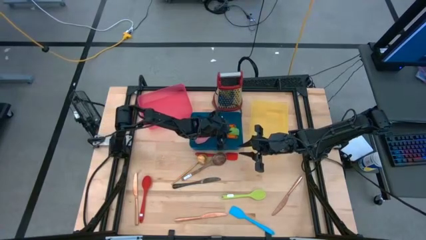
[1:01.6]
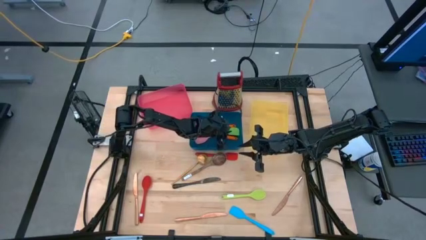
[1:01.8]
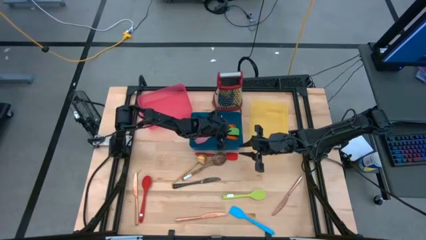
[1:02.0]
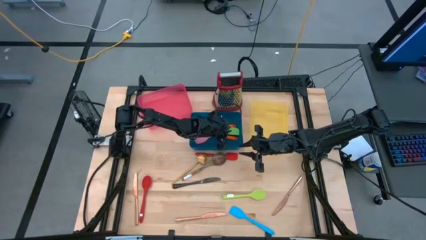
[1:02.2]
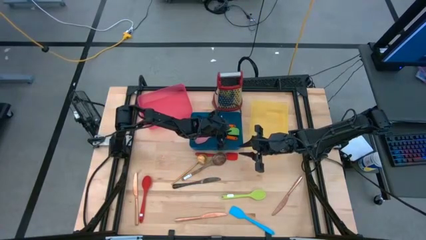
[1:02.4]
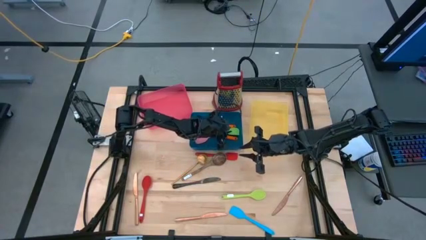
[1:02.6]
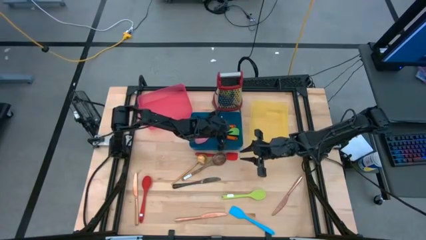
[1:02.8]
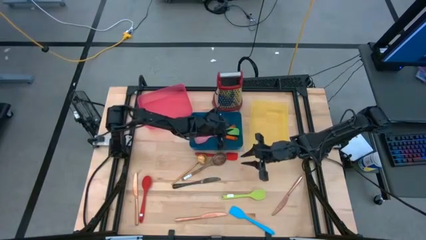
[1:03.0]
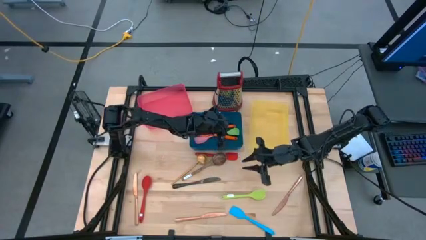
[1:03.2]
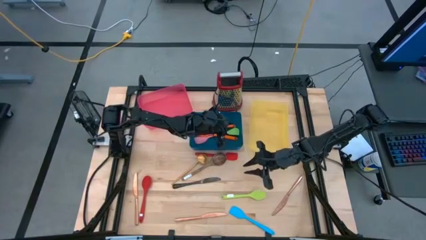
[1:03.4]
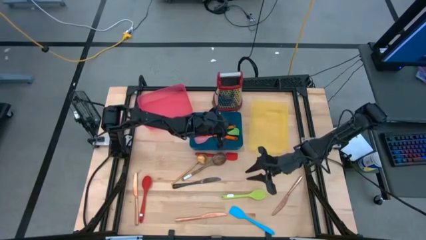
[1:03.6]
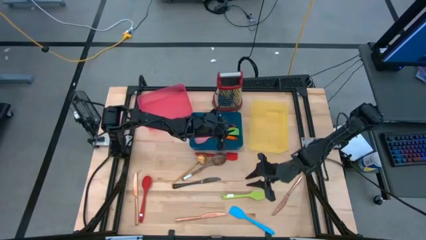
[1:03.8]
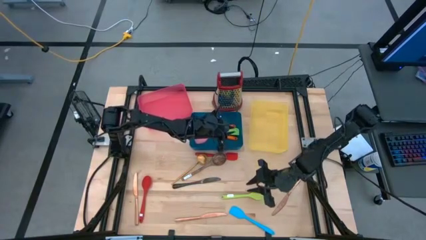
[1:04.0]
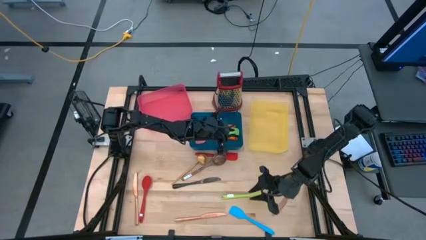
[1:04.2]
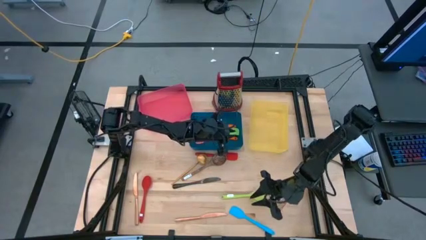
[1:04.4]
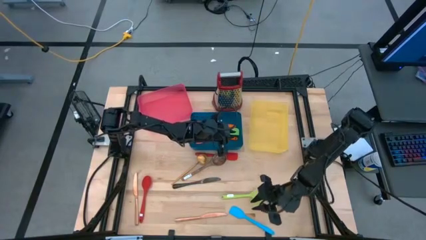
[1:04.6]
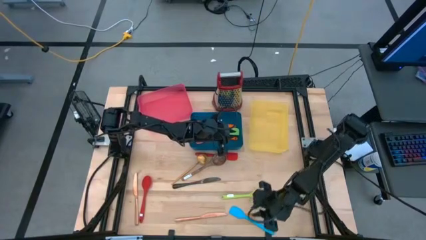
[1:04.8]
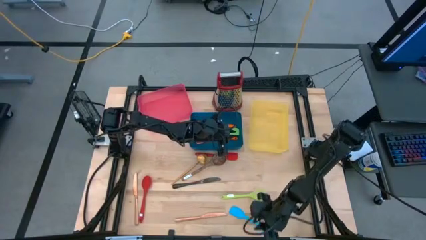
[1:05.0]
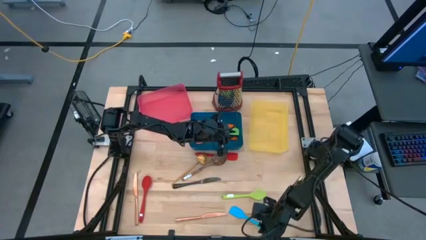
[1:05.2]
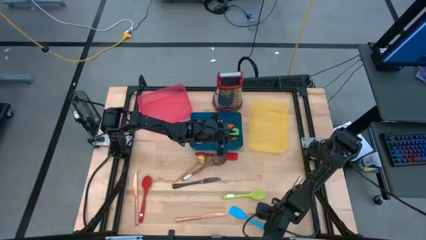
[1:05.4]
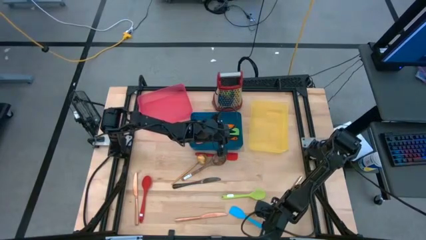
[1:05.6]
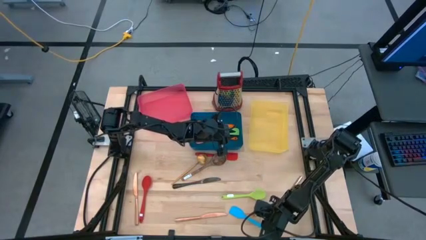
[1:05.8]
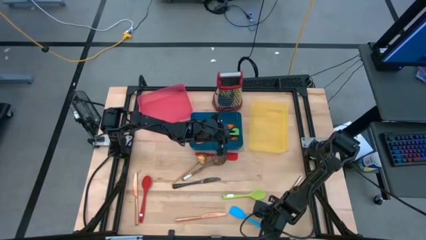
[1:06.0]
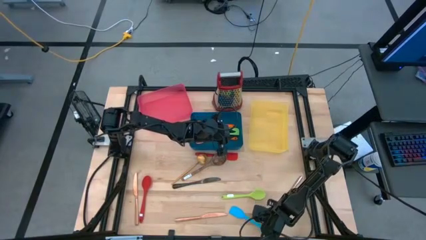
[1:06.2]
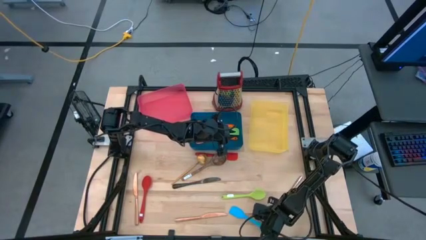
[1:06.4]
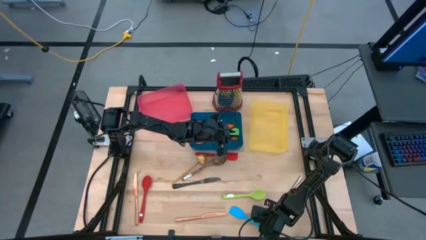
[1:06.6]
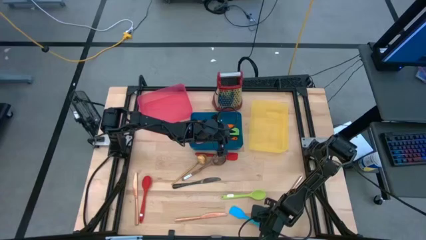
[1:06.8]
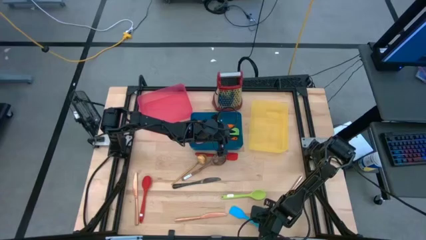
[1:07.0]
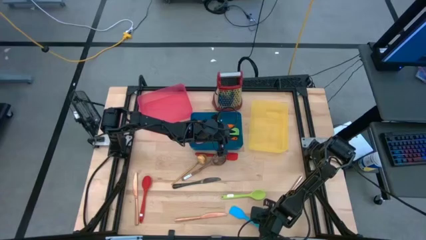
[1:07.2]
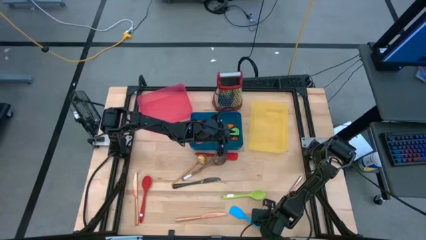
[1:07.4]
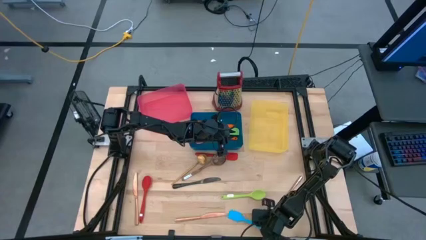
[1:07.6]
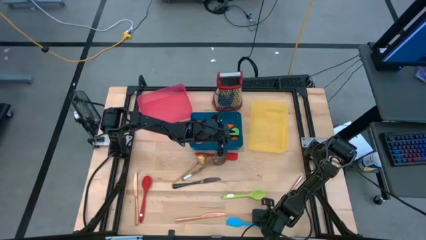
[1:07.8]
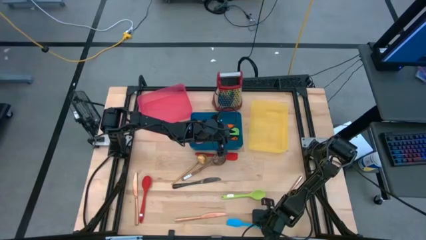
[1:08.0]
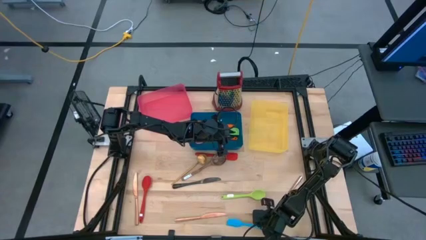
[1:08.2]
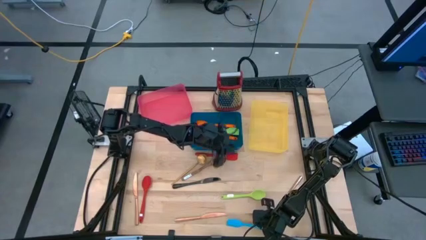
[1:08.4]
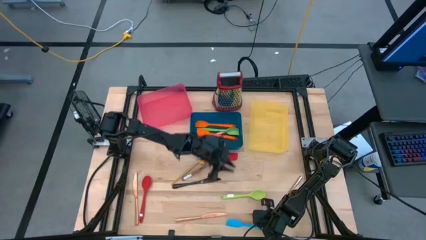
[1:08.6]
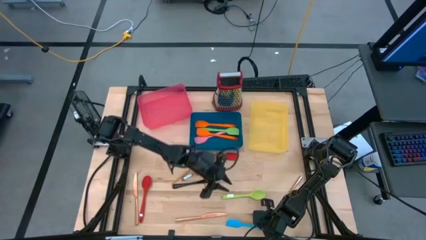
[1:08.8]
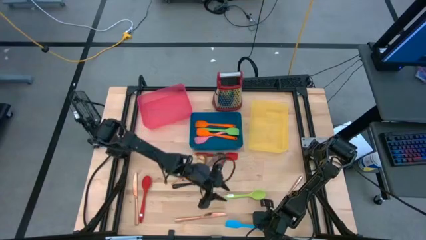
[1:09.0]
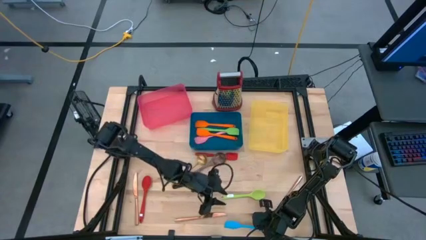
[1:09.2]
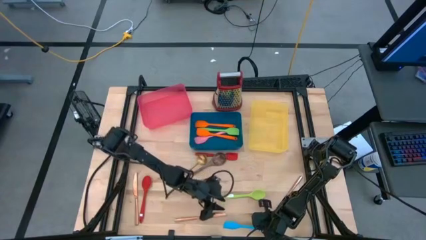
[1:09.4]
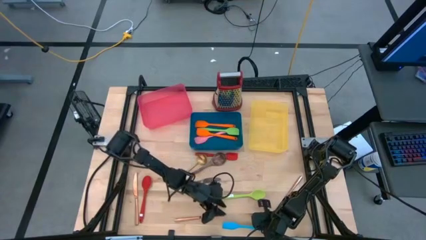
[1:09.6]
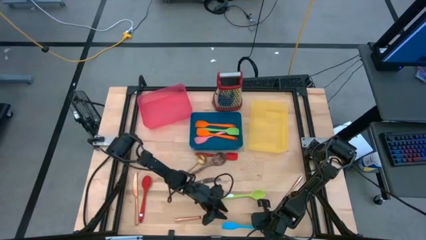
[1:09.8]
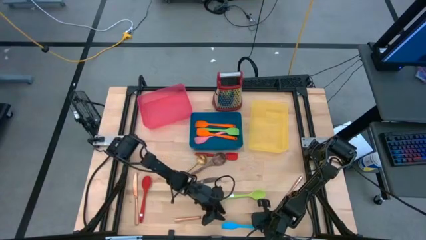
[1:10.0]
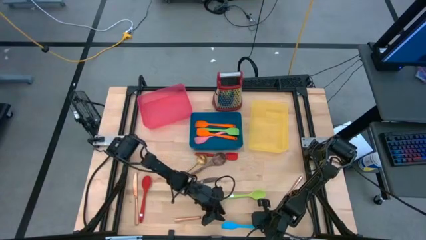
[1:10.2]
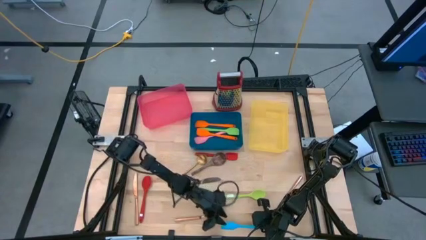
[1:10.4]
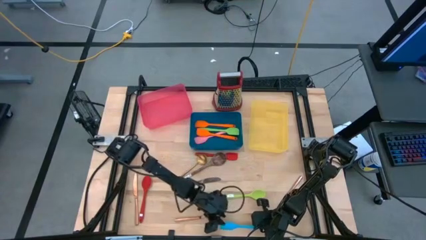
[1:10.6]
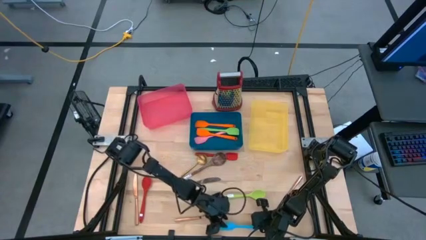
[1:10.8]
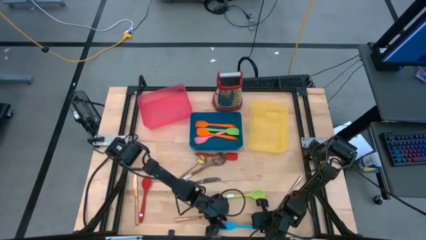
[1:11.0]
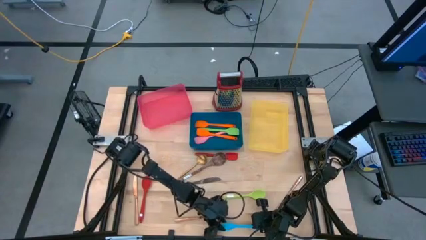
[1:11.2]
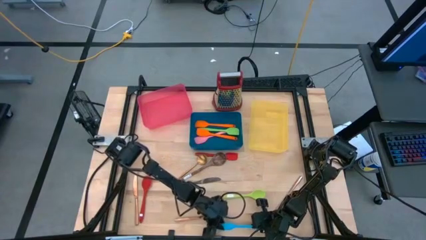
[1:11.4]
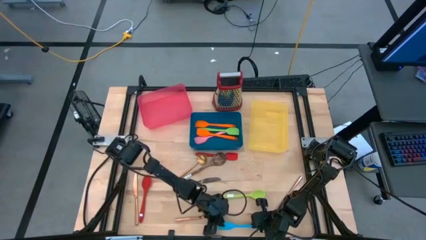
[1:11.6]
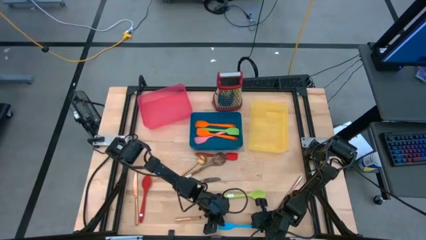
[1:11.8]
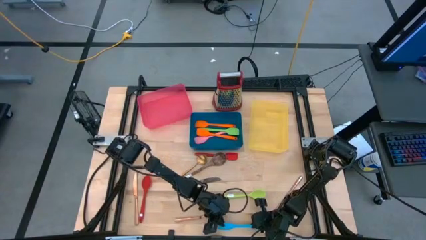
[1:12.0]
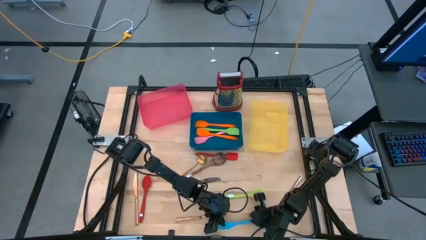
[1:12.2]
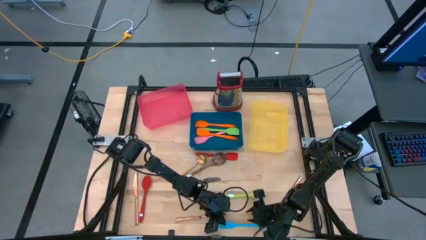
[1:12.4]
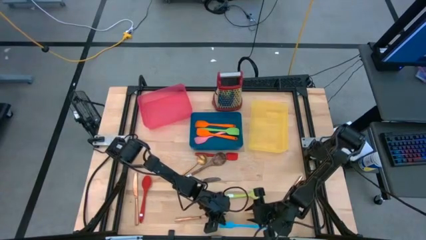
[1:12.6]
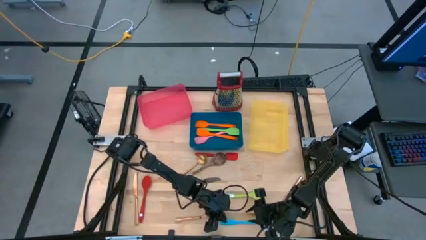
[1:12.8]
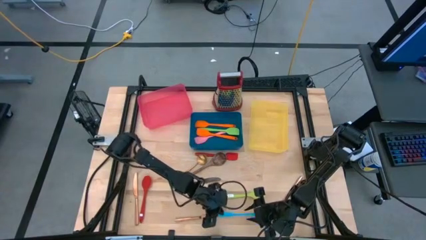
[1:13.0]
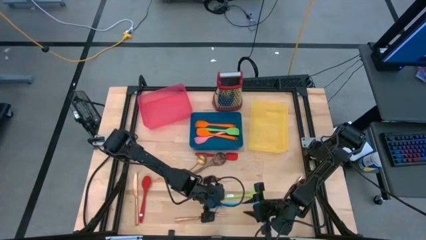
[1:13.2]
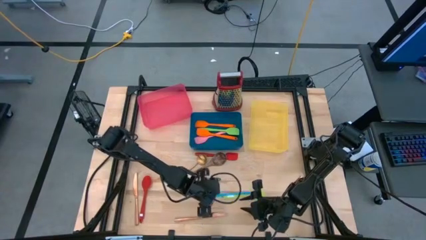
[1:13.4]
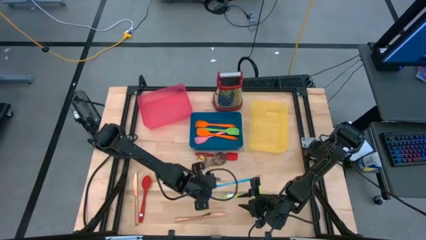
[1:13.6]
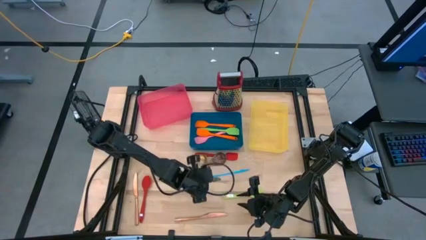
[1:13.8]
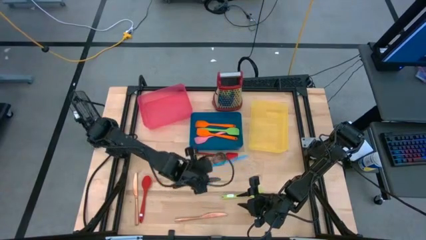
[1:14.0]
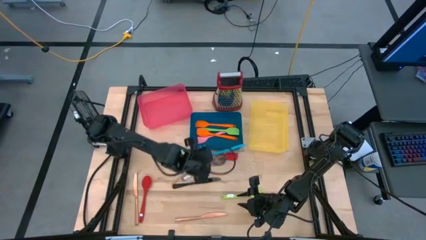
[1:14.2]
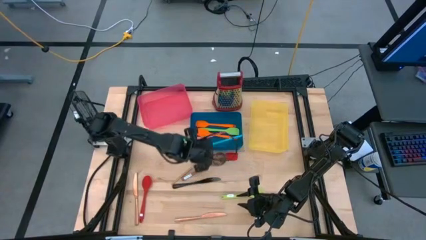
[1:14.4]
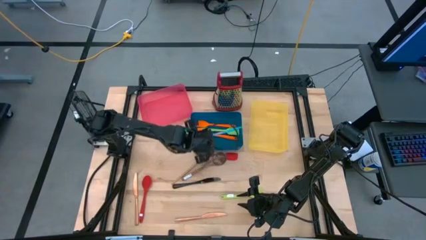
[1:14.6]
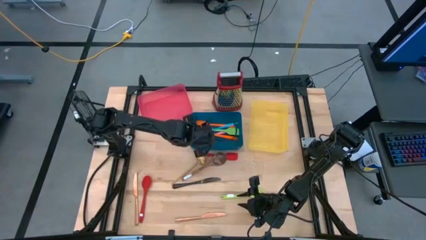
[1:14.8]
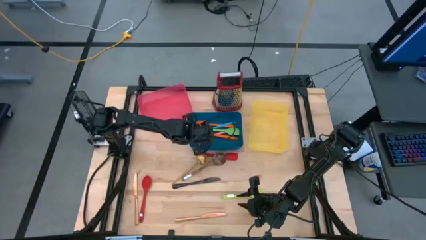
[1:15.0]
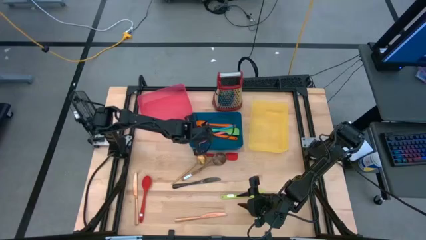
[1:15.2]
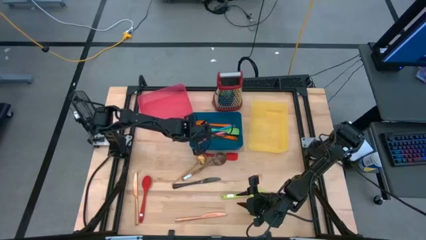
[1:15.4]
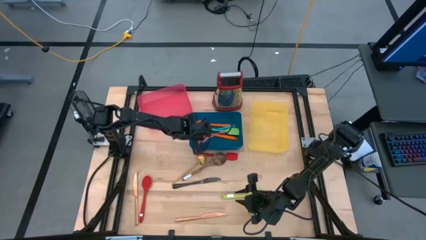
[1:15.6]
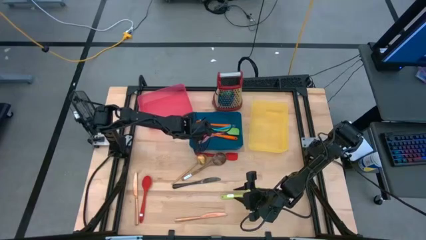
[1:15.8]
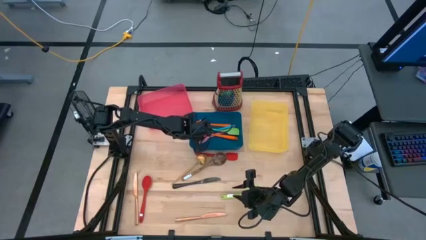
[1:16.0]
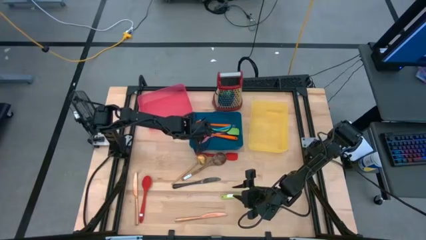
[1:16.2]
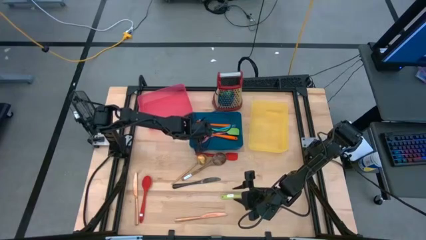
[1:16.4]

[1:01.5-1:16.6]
Task: Pick & Place Kitchen Items
Put the blue spatula into the blue bin
